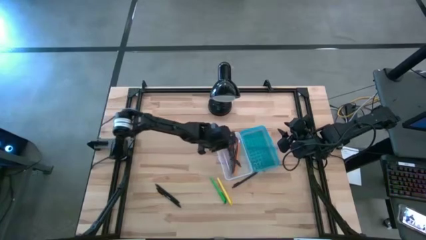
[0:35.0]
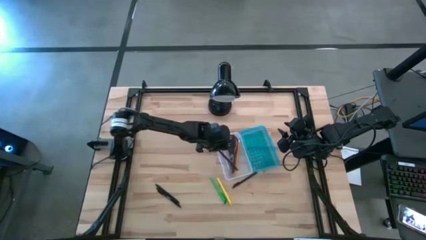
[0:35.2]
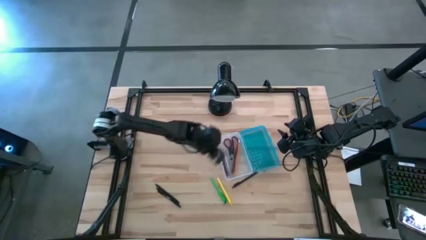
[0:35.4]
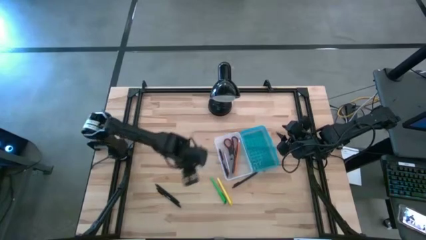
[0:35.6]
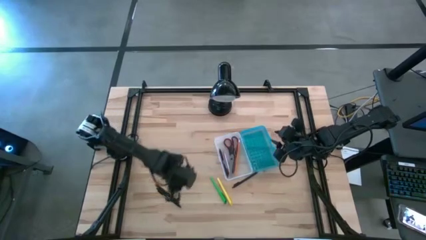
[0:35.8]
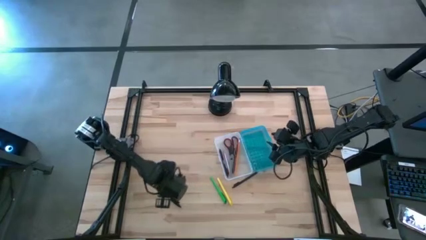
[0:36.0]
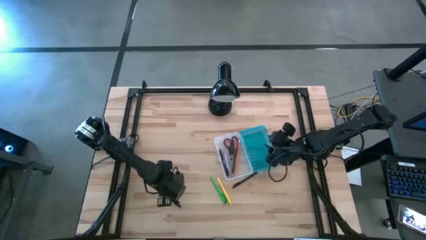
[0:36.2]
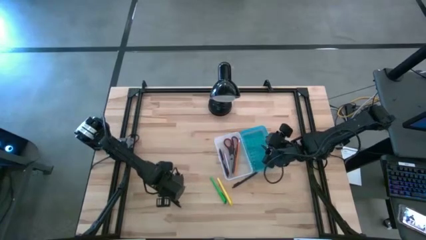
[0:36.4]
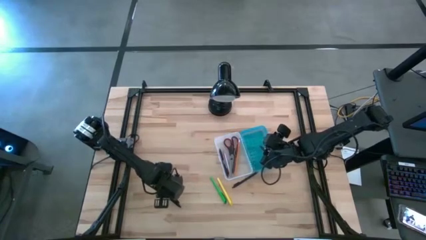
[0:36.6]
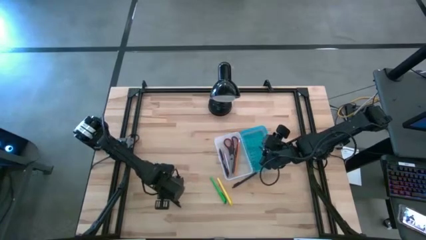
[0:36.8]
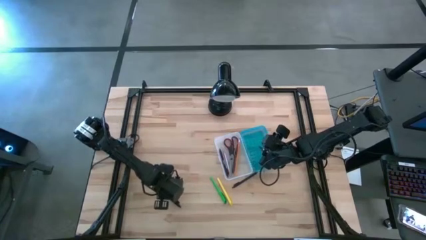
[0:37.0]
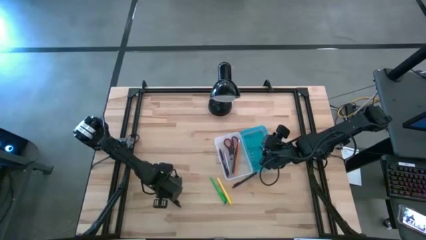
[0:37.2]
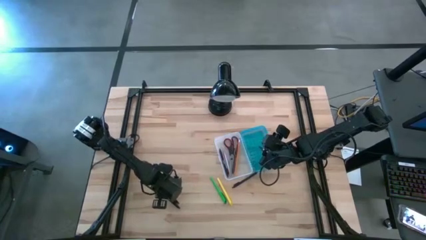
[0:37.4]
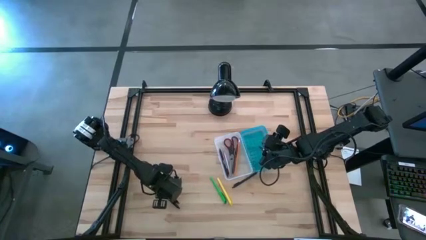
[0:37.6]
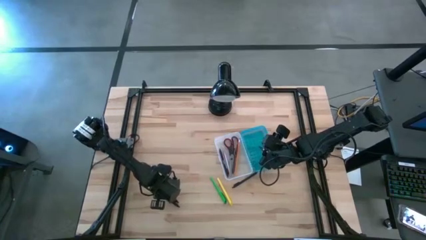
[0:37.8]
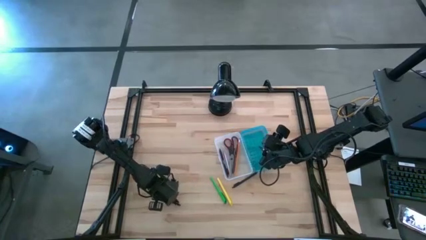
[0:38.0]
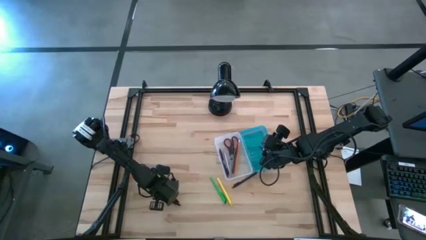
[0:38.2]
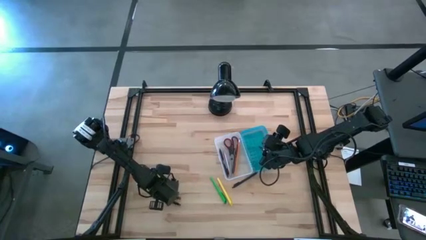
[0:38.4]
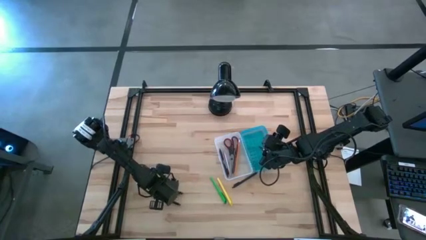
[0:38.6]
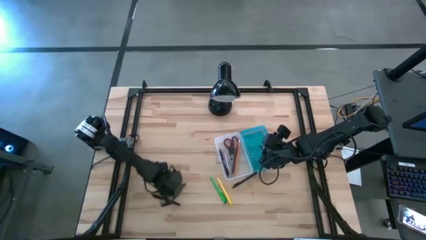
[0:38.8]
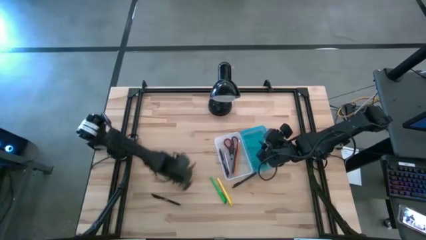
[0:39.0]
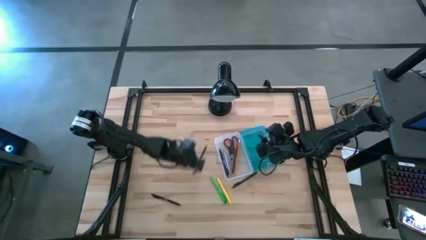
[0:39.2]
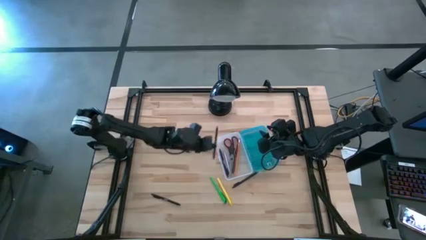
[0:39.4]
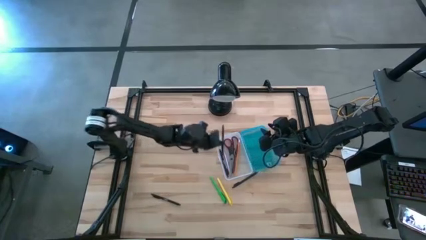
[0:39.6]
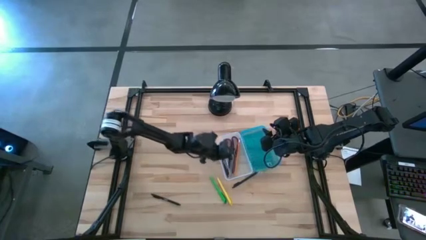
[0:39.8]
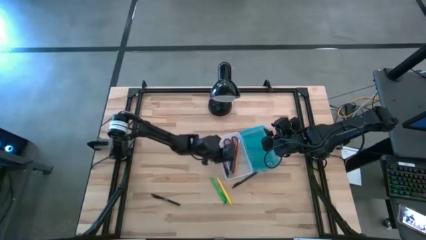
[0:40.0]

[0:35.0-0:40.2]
Task: Pick & place school supplies into a supply box
Put the black pen into the supply box

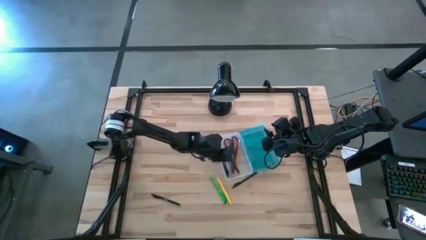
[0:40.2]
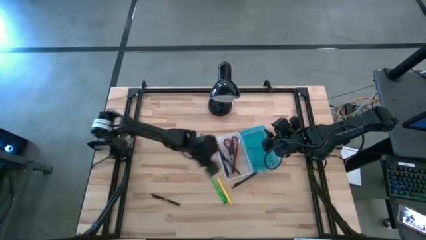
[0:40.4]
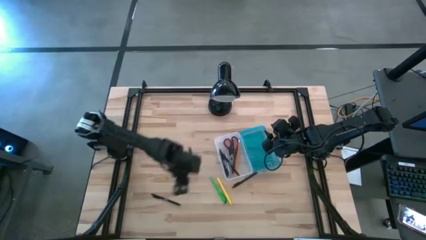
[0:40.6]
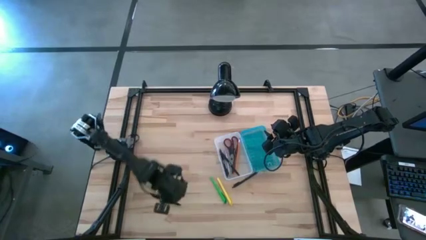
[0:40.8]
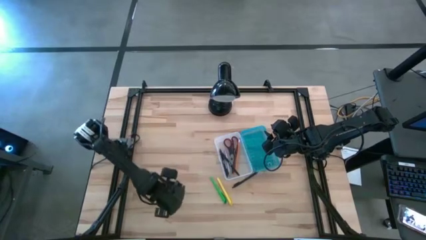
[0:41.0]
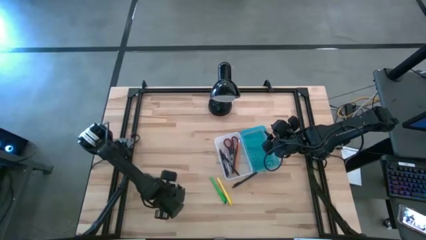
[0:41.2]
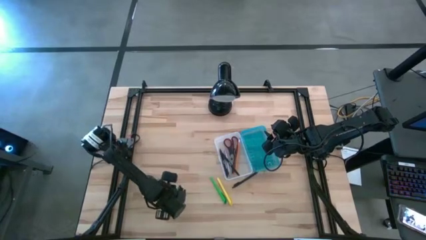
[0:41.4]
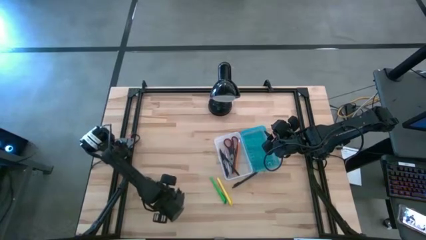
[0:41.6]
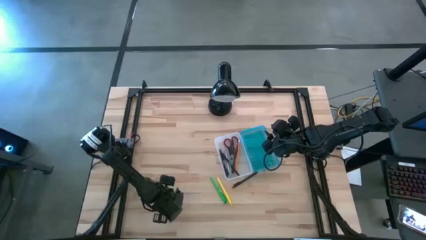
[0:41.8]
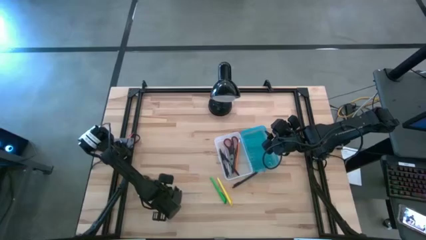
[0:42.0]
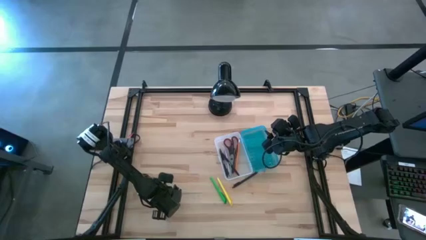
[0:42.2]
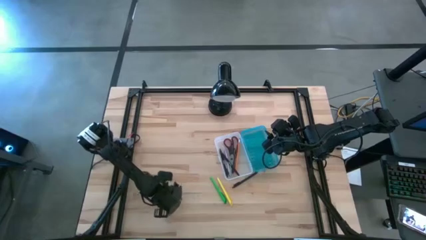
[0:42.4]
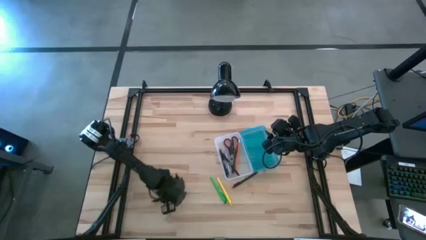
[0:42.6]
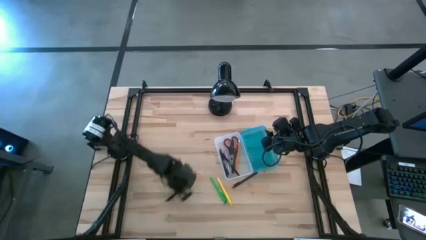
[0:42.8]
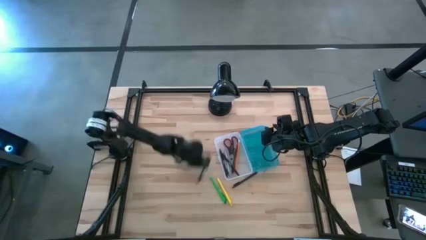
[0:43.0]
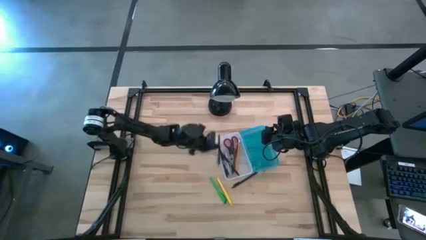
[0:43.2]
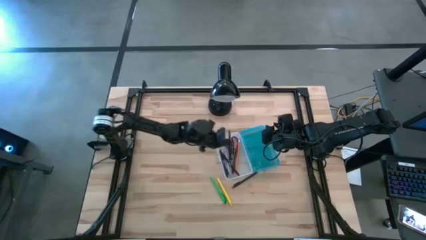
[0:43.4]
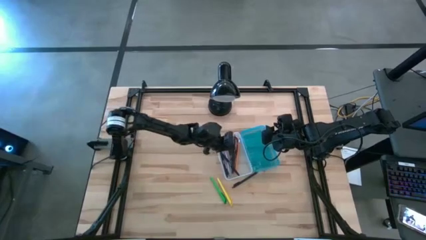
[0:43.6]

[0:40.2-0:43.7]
Put the black pen into the supply box

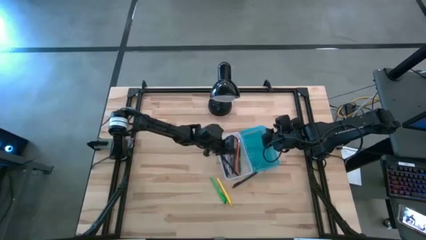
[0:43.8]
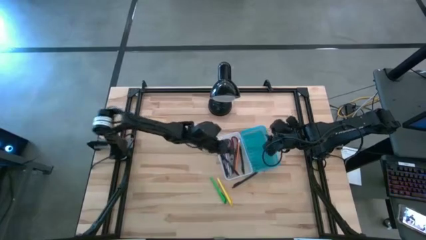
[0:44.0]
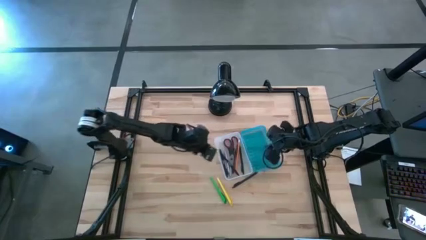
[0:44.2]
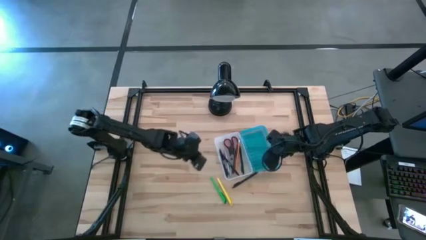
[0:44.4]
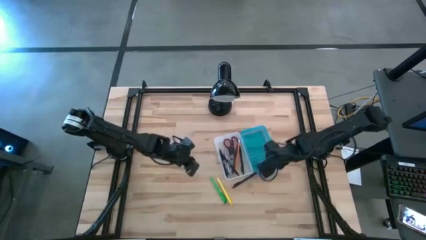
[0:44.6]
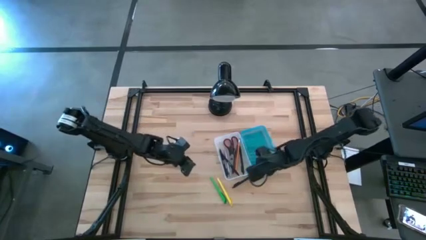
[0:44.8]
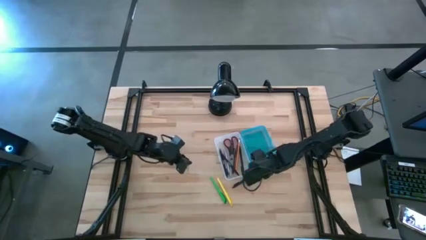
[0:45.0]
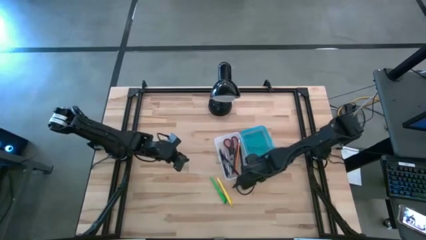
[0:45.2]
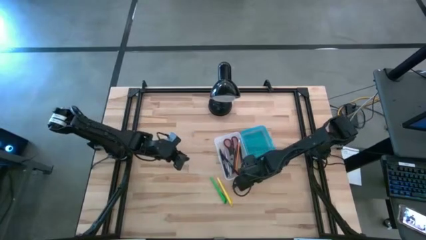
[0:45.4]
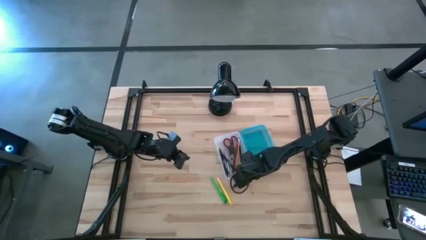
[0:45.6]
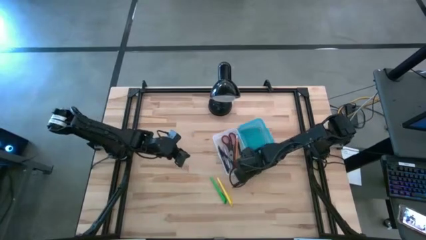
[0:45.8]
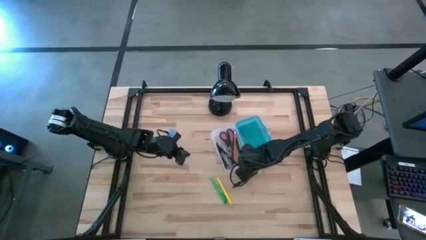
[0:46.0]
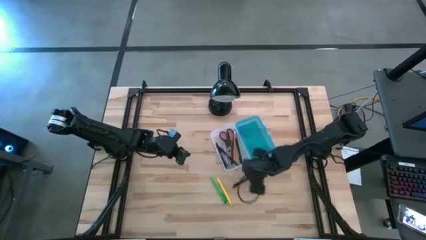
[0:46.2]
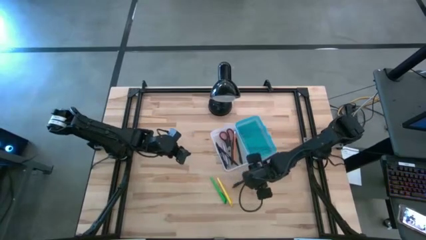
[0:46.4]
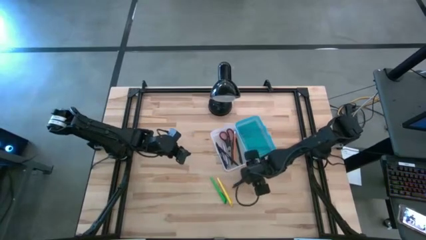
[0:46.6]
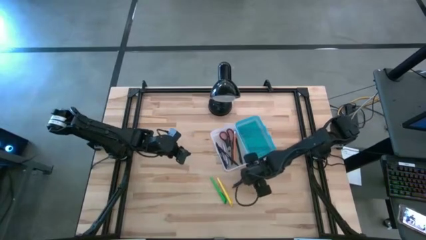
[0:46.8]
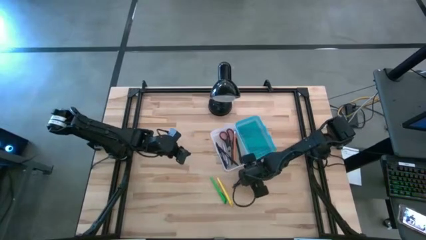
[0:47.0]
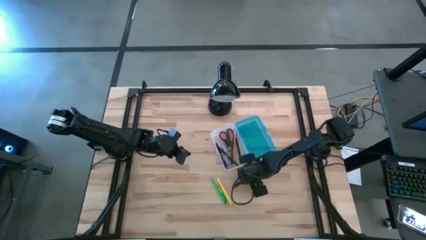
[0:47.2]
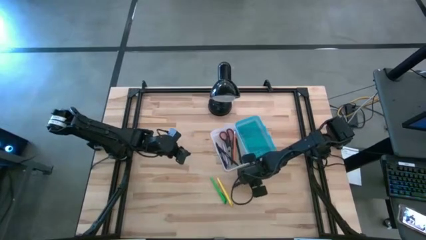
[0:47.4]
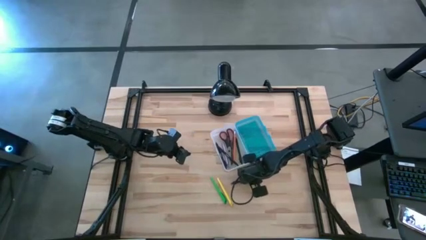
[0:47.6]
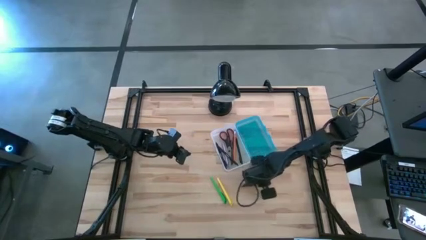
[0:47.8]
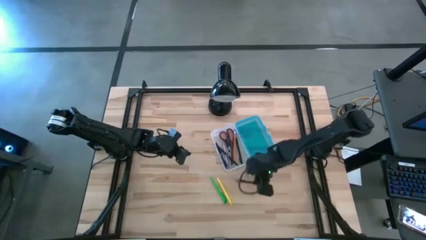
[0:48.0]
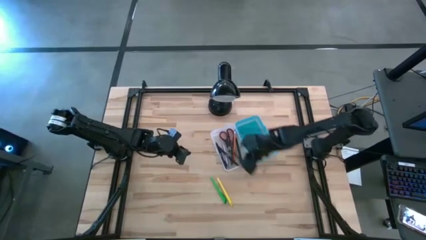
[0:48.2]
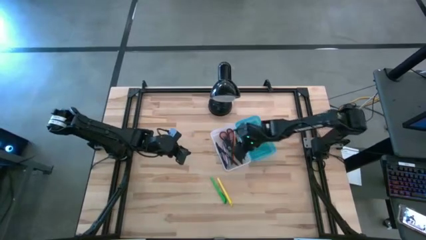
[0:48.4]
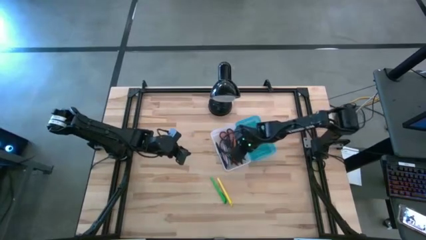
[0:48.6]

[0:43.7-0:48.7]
Put the black pen into the supply box

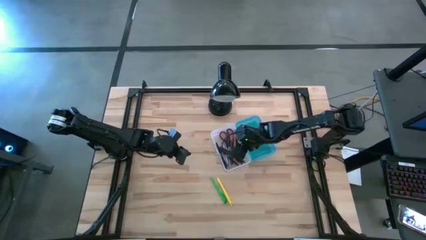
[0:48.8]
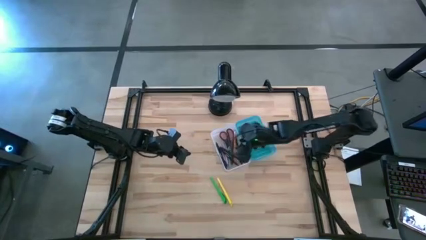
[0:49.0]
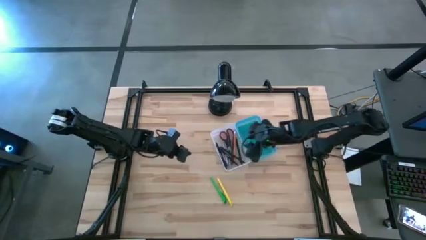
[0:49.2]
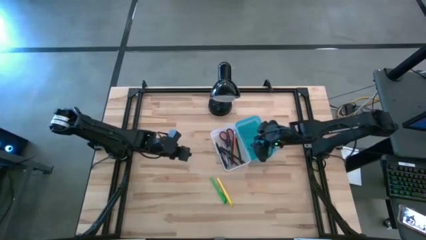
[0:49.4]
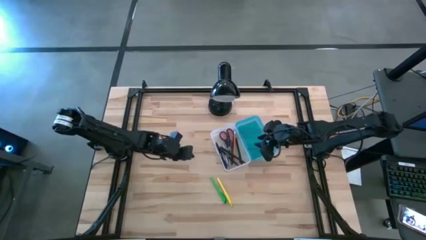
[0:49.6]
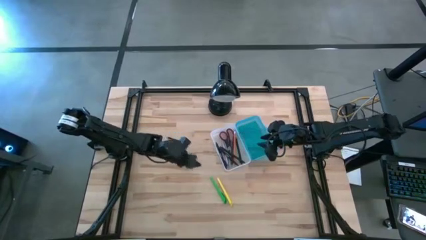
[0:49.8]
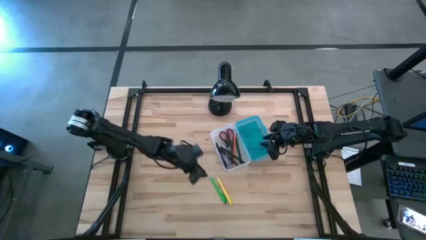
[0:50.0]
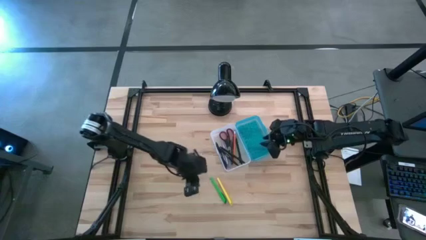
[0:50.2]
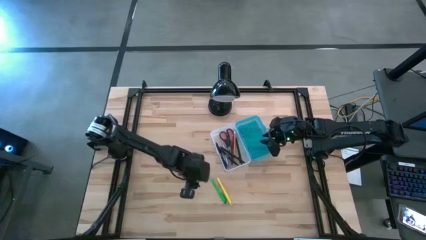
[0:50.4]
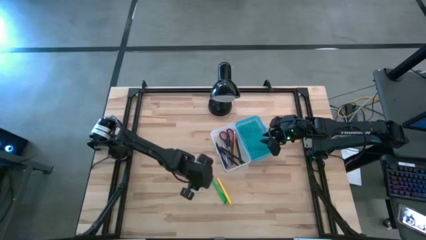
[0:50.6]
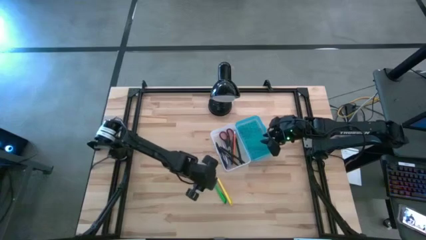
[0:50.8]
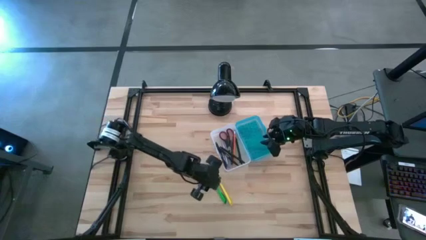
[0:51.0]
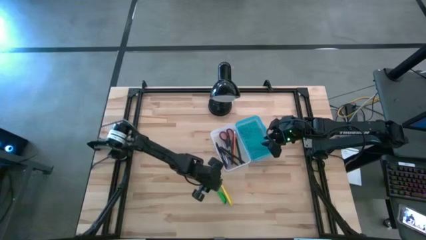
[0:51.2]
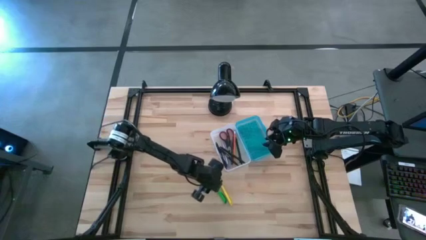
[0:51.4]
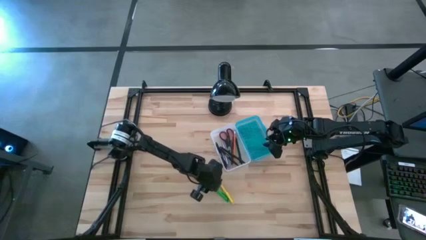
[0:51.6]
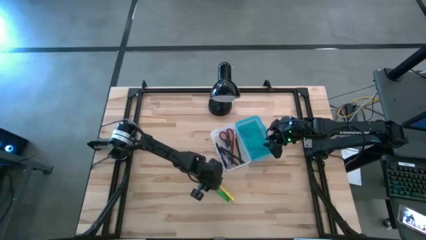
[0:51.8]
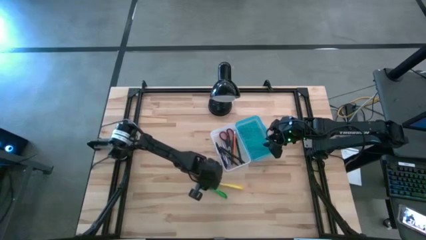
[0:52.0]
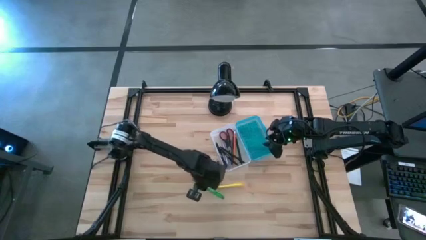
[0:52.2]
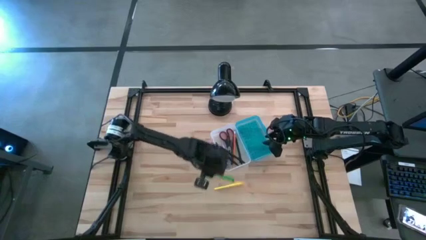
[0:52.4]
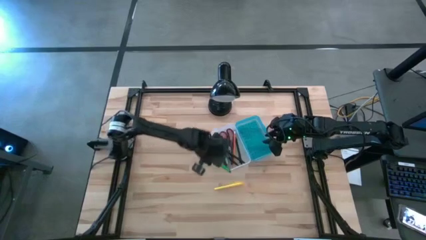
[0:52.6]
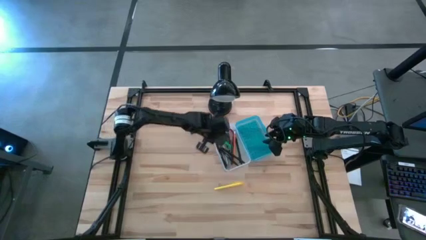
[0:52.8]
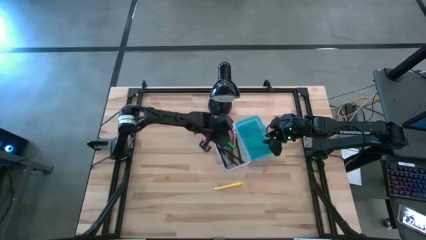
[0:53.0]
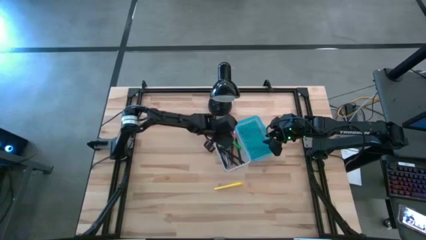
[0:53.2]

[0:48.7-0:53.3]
Put the green highlighter pen into the supply box
